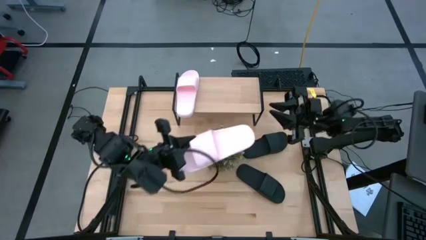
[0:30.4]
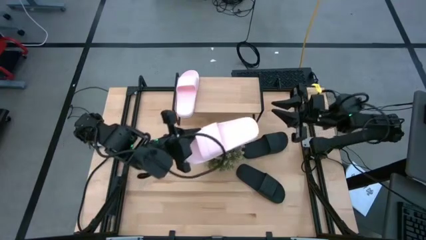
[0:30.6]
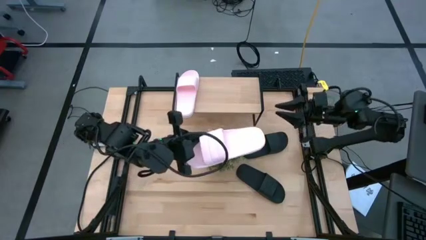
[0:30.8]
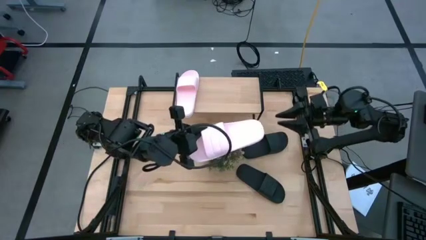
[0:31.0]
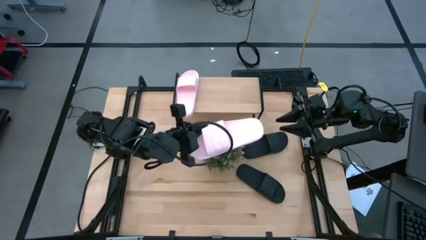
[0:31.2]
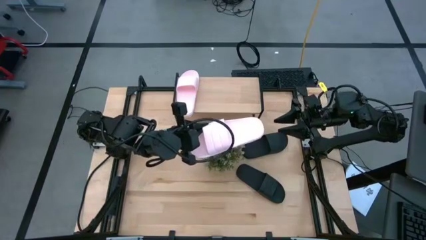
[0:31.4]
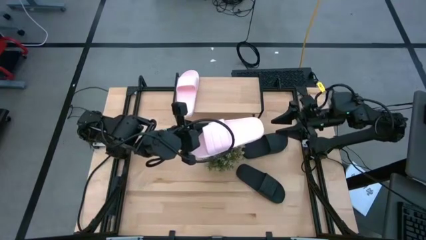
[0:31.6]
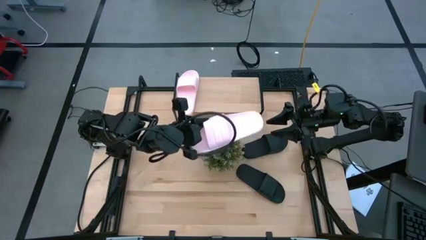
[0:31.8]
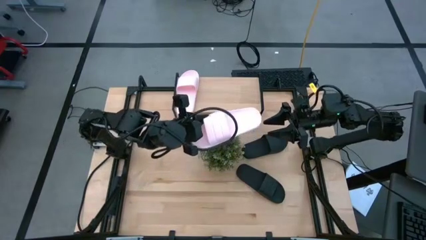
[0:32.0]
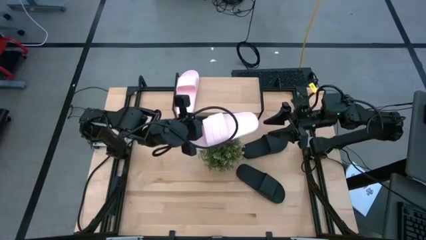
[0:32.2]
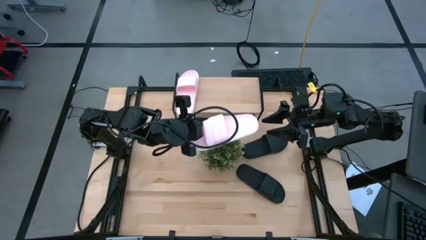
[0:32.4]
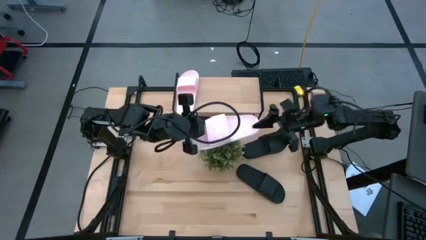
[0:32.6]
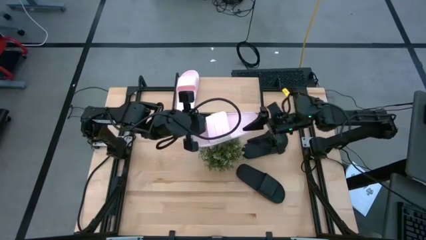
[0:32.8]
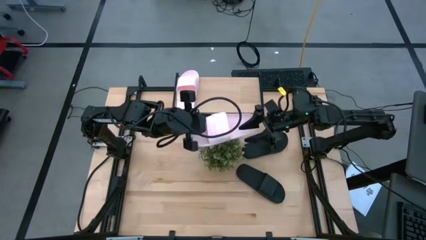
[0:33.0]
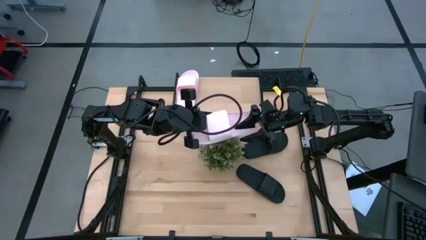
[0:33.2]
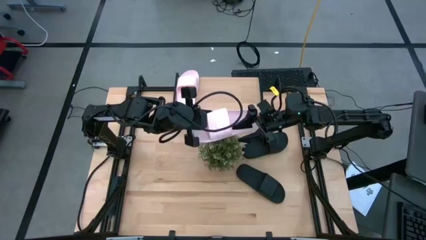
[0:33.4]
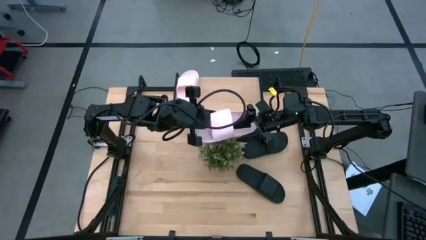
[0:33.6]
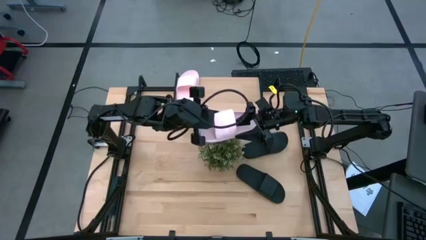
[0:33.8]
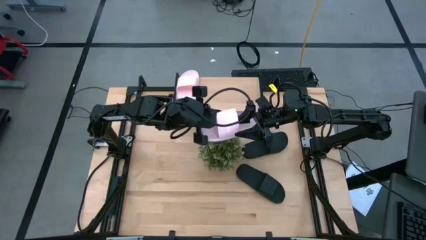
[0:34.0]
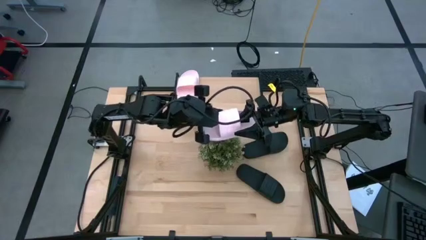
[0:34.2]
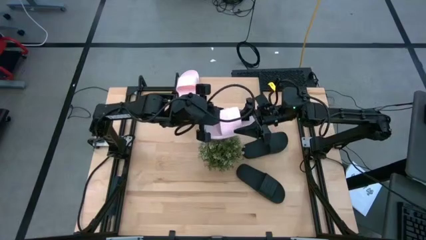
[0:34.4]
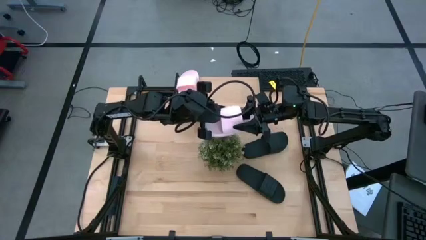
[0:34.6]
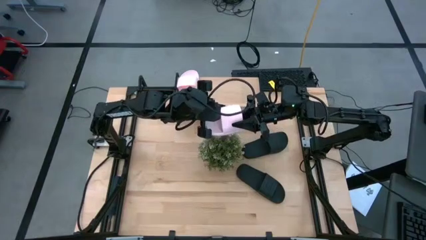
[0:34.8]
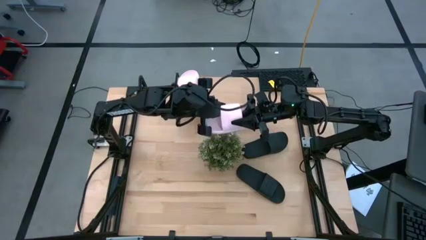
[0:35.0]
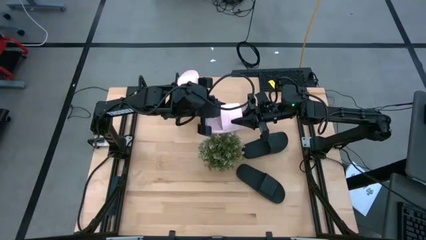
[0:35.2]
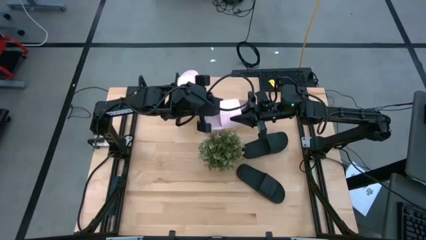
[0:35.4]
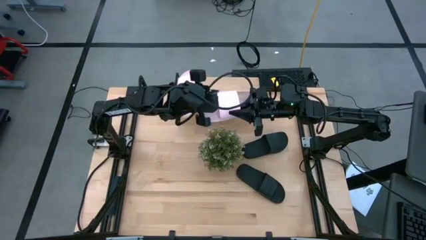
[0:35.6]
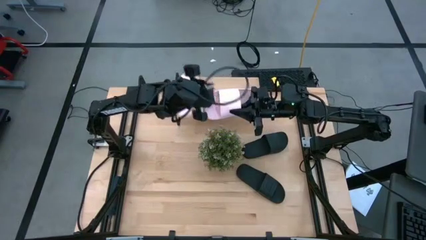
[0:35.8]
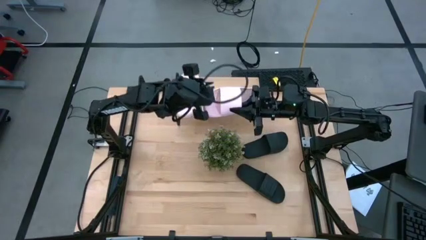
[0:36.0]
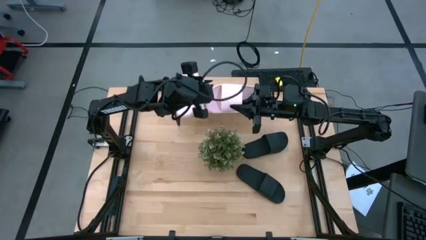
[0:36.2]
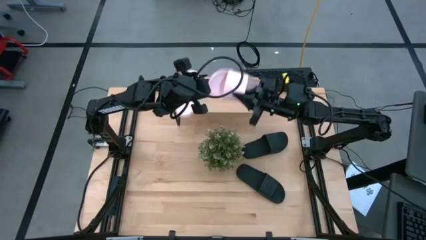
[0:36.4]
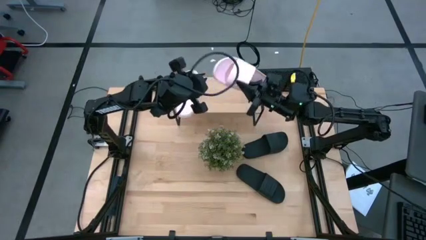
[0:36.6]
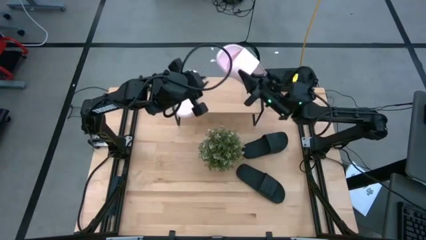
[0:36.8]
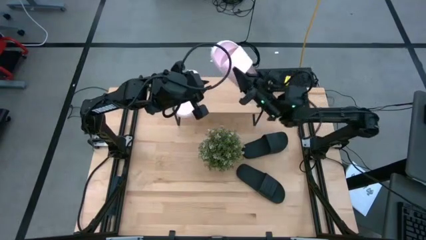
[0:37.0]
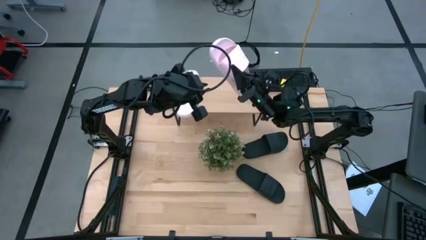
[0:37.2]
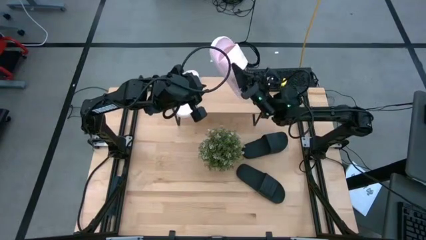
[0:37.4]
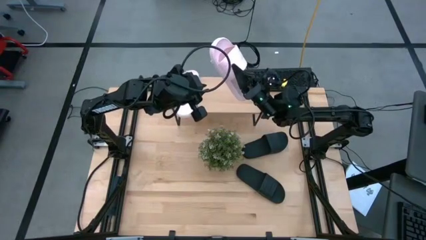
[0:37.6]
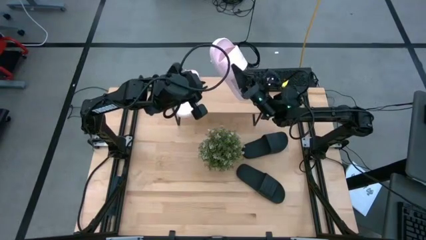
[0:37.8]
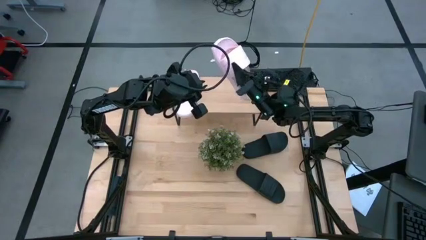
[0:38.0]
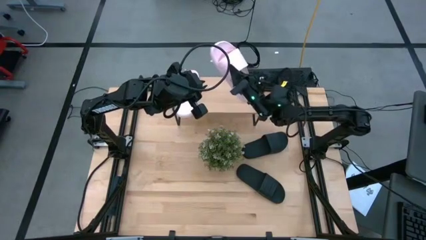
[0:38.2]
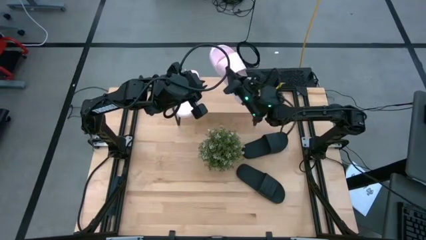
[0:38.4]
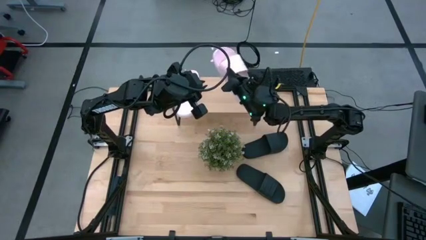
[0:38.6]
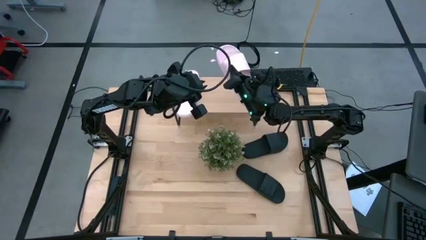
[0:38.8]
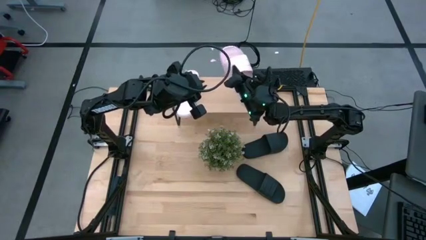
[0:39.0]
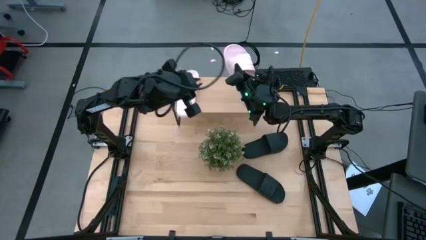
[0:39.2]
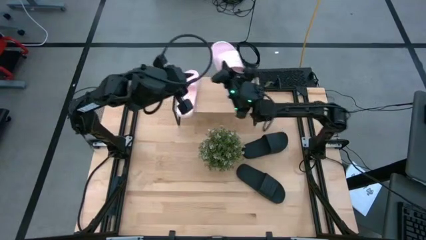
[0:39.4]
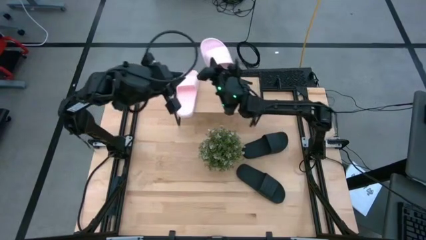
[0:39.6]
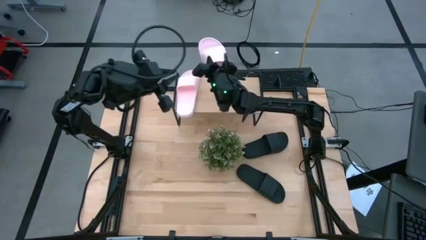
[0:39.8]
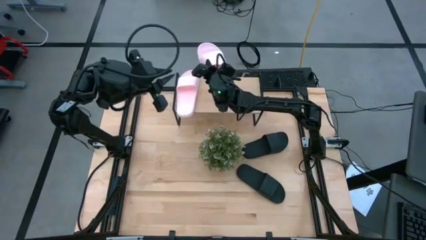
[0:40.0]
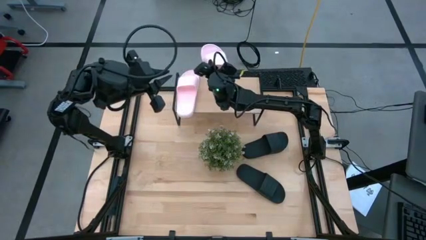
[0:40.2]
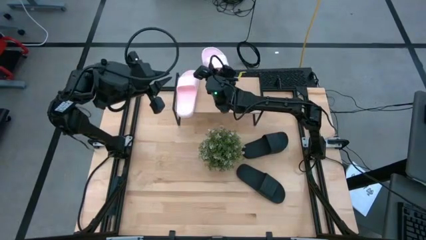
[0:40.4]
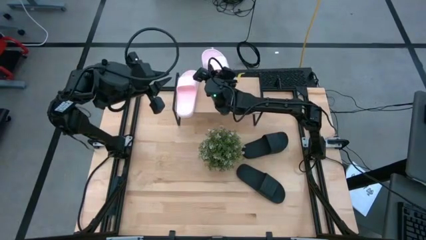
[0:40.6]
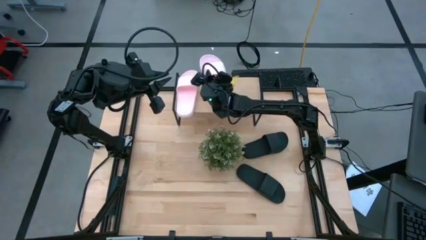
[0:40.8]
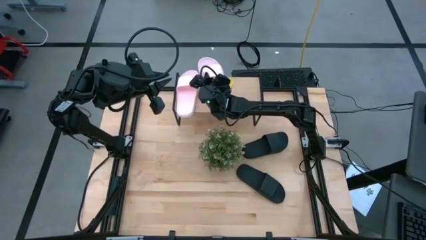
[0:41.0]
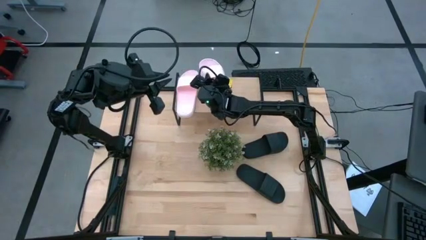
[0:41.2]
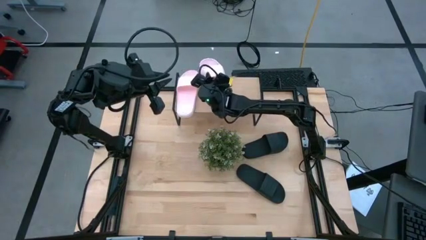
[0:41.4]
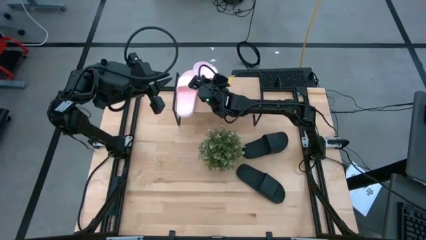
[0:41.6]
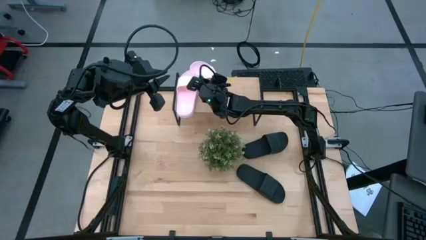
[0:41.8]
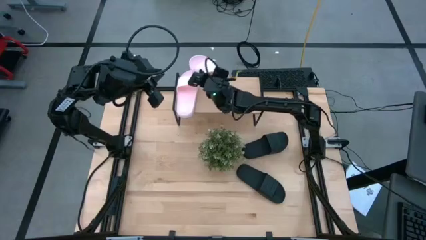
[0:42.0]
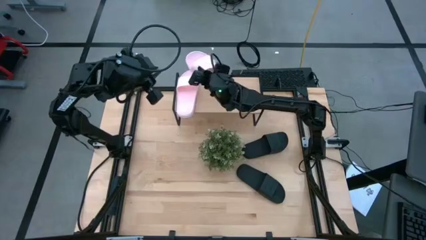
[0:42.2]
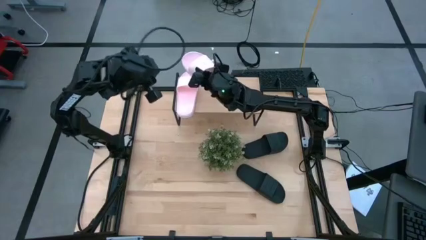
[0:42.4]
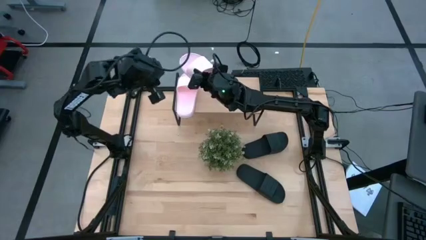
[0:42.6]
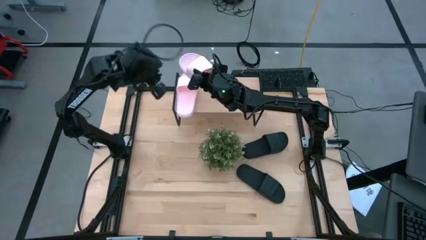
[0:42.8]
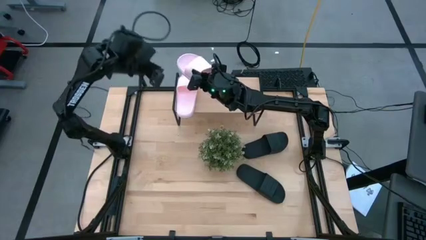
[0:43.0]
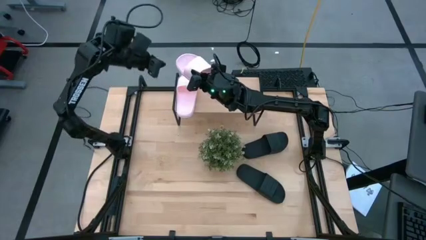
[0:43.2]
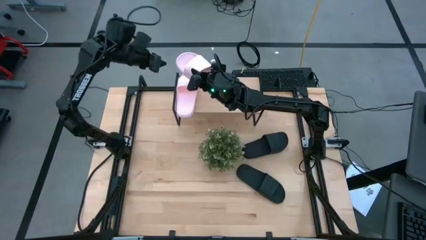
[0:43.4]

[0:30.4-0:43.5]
Task: Pick and place slides into the shelf
Put the pink slipper on the shelf
